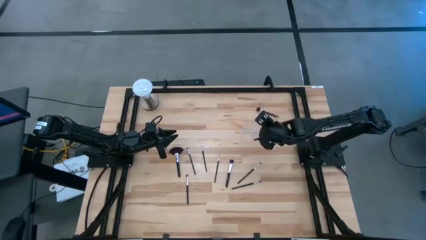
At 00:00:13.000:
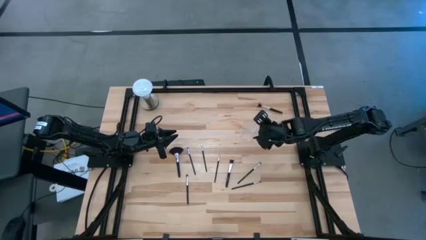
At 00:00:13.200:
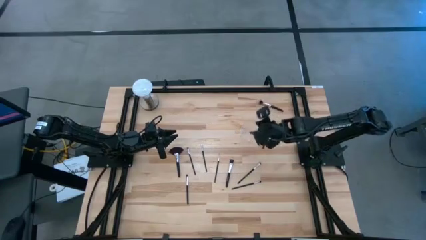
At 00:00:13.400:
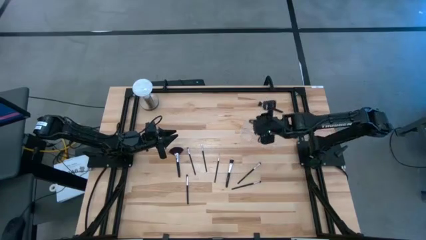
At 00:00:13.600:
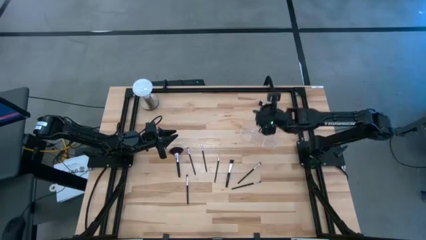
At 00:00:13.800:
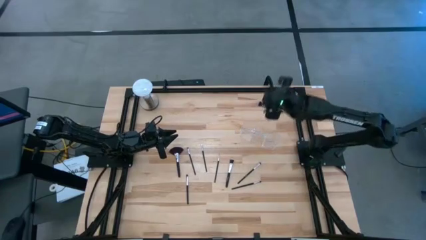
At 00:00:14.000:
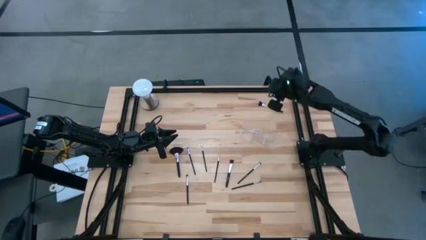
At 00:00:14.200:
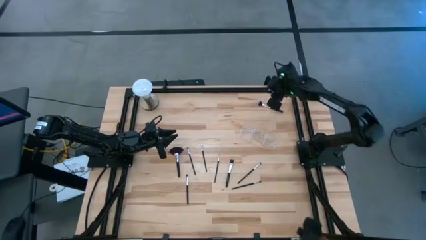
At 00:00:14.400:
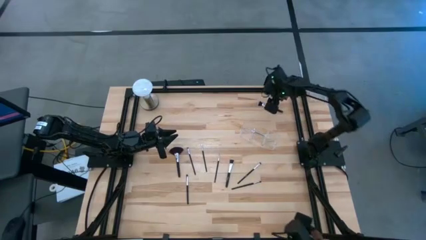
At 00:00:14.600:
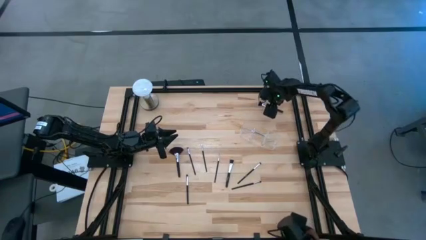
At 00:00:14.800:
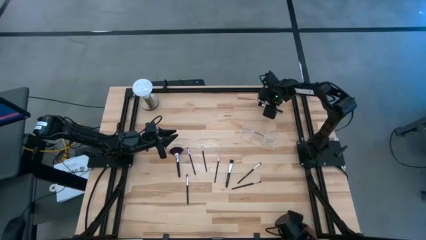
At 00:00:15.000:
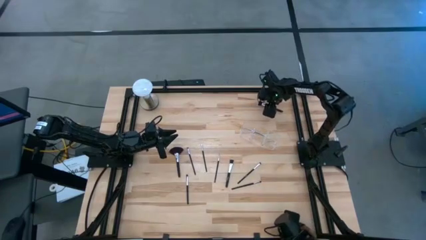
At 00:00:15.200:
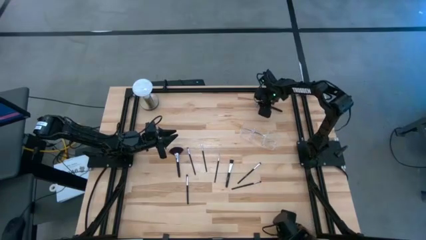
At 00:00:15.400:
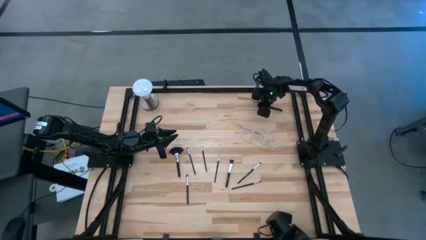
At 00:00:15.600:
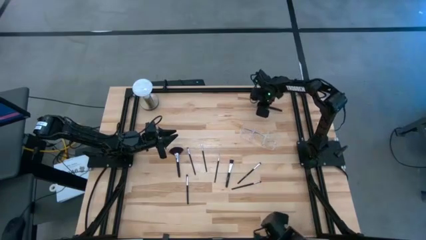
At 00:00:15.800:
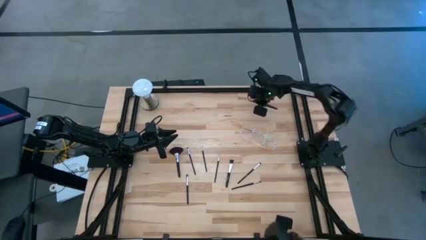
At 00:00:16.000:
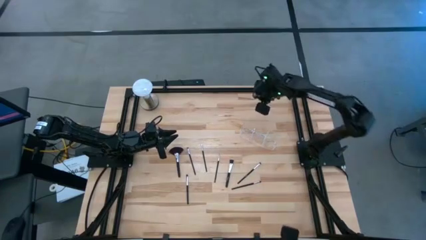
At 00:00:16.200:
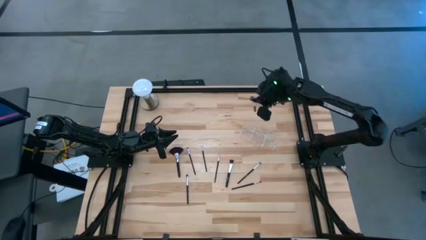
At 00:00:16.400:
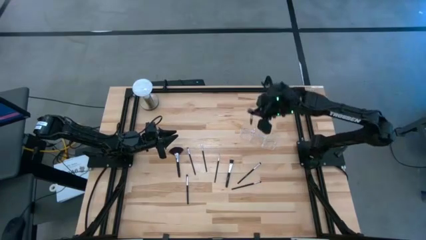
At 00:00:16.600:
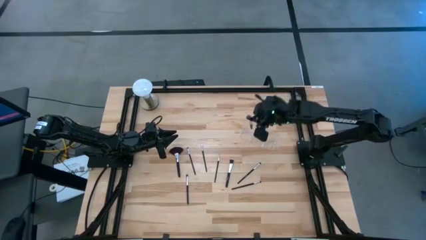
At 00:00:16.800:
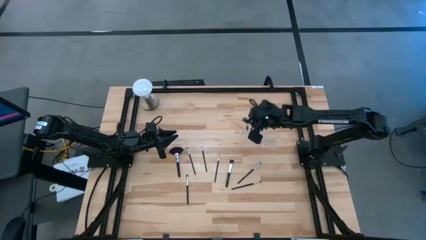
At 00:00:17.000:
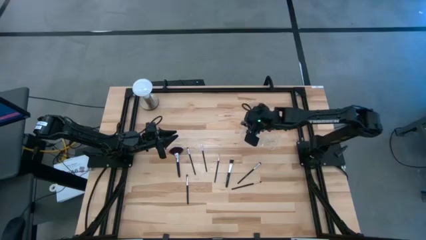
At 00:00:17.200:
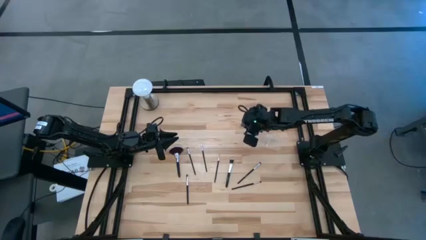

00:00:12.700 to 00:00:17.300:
Task: Pick & Place Makeup Supplies
Put the black makeup brush into the transparent organizer

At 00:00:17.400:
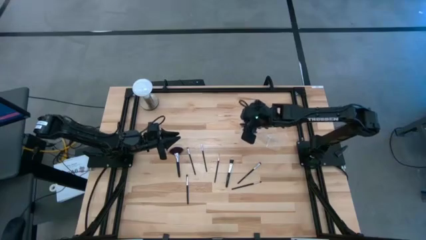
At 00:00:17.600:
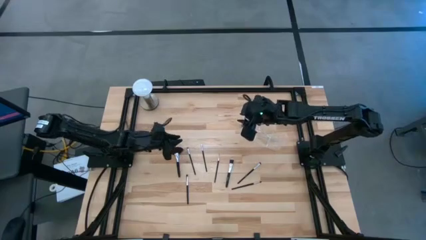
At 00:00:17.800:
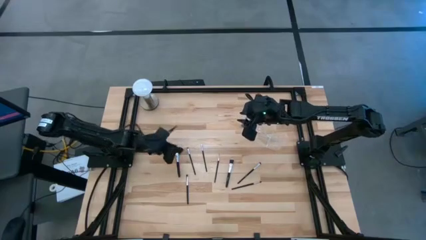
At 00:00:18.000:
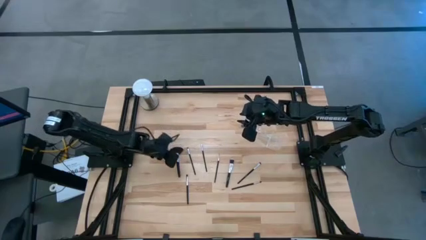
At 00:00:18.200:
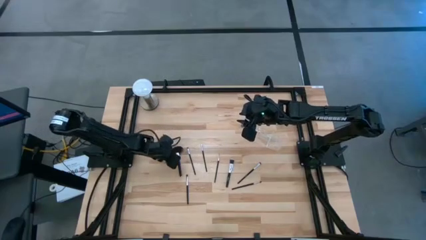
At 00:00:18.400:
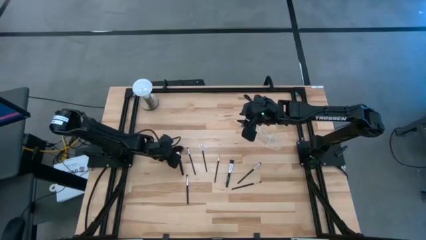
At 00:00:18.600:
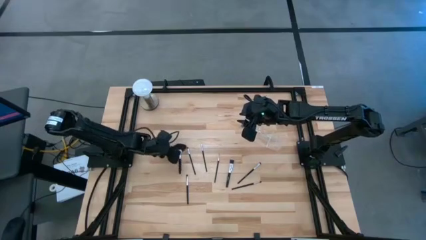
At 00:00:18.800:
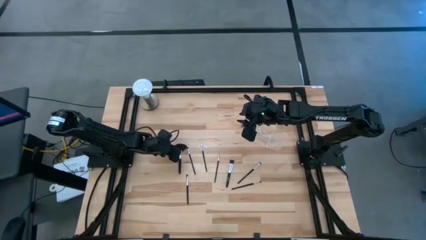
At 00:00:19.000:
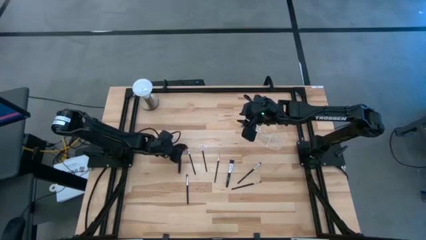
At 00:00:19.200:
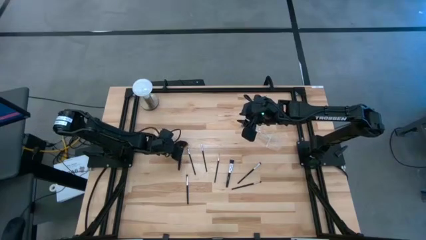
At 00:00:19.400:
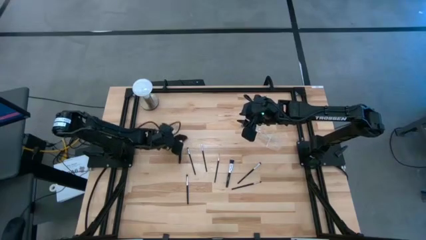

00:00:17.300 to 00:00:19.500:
Put the black makeup brush into the transparent organizer

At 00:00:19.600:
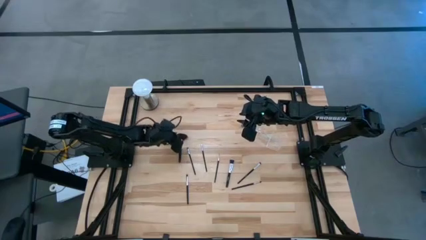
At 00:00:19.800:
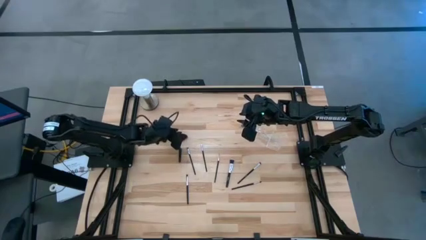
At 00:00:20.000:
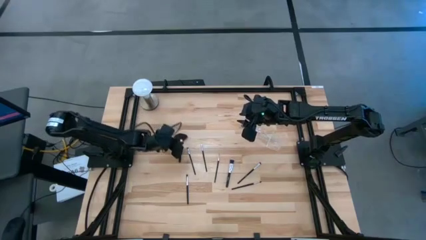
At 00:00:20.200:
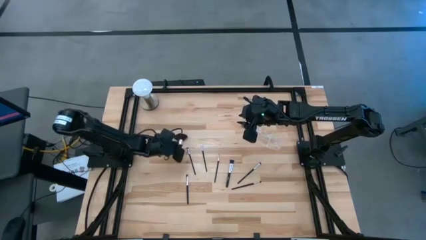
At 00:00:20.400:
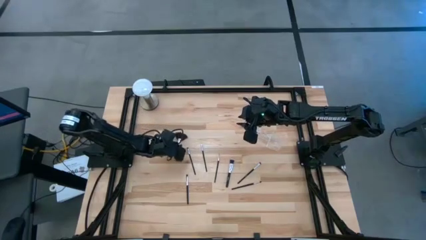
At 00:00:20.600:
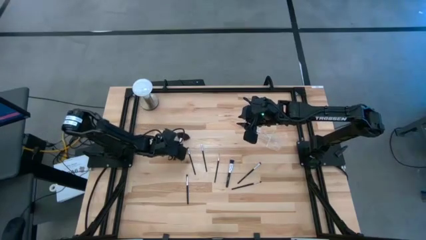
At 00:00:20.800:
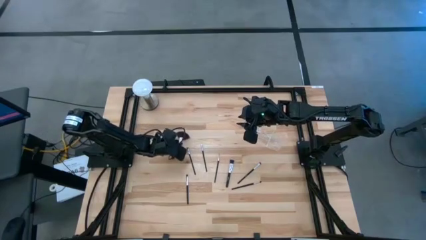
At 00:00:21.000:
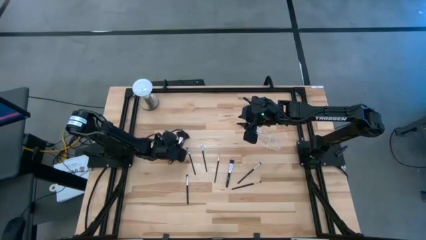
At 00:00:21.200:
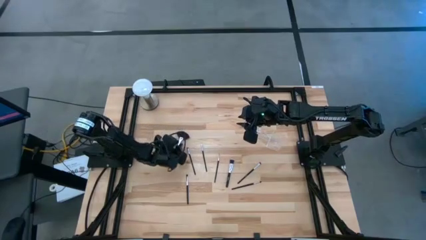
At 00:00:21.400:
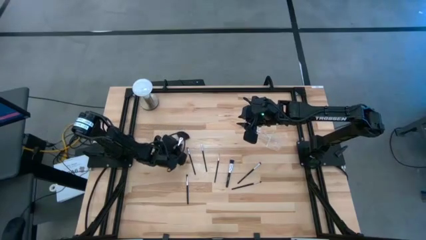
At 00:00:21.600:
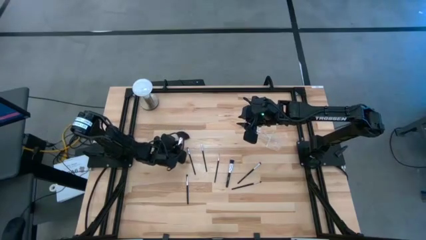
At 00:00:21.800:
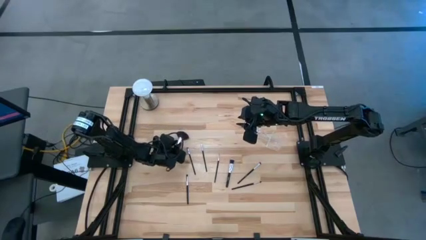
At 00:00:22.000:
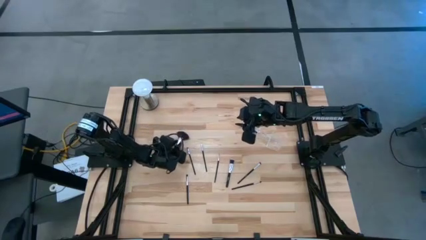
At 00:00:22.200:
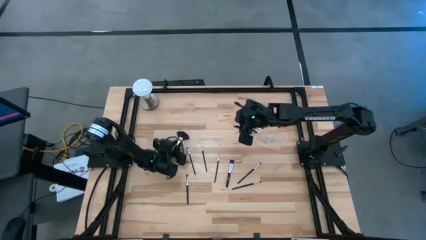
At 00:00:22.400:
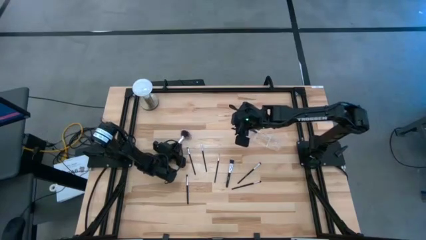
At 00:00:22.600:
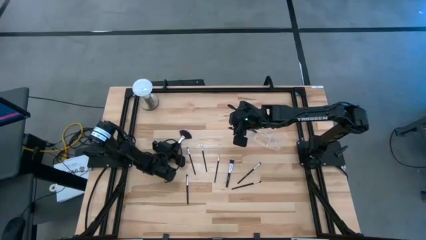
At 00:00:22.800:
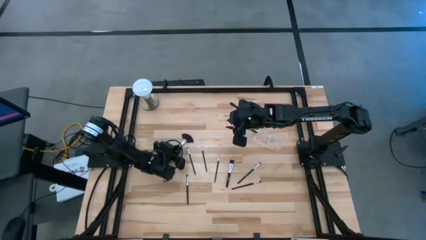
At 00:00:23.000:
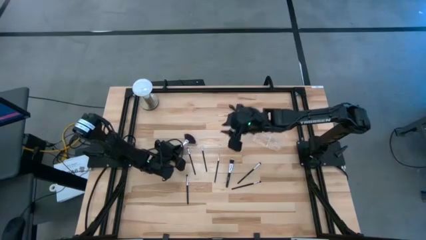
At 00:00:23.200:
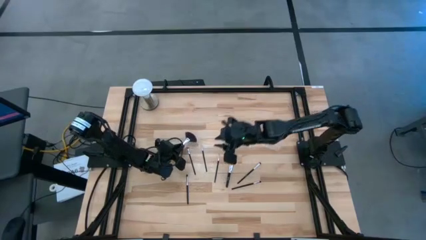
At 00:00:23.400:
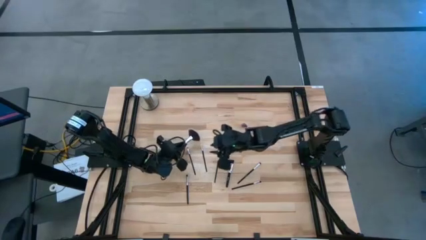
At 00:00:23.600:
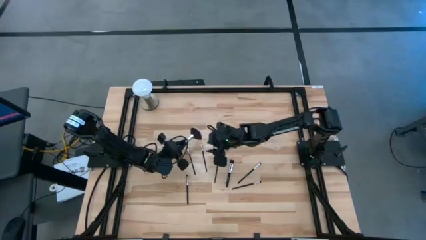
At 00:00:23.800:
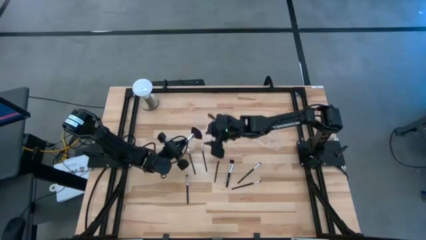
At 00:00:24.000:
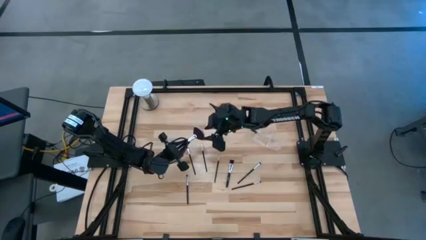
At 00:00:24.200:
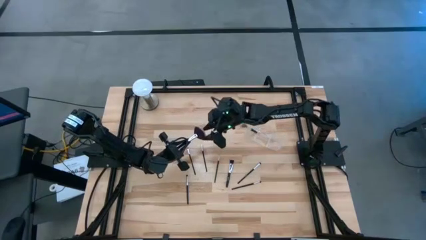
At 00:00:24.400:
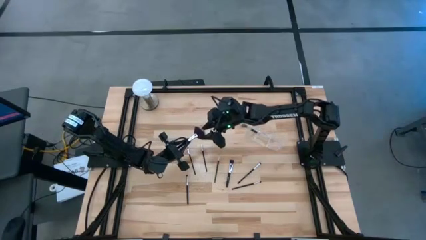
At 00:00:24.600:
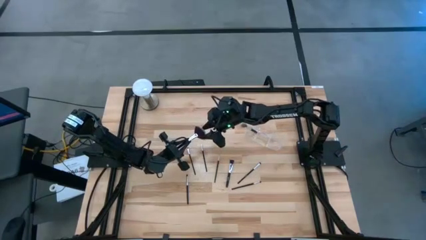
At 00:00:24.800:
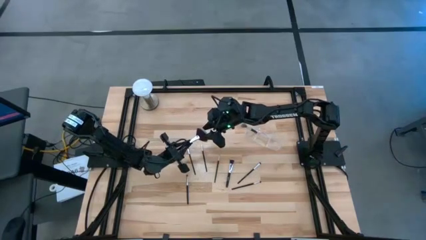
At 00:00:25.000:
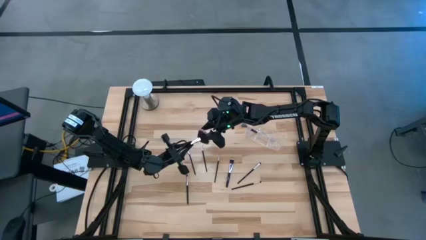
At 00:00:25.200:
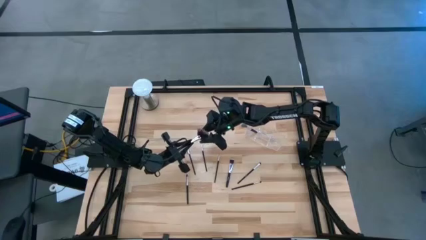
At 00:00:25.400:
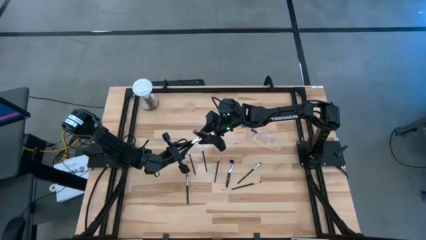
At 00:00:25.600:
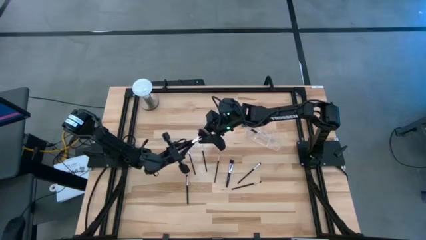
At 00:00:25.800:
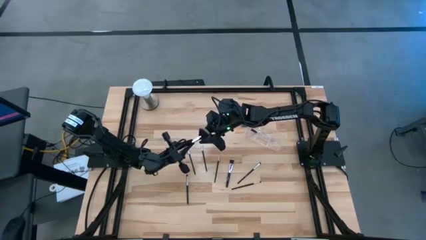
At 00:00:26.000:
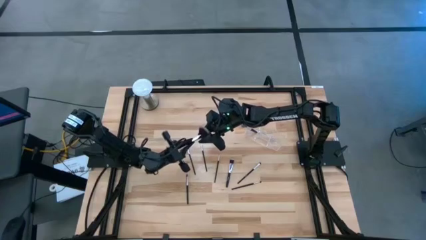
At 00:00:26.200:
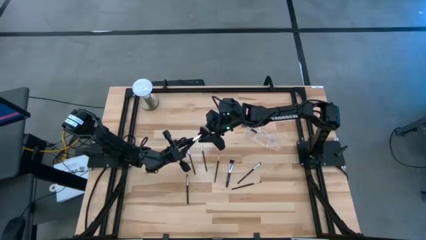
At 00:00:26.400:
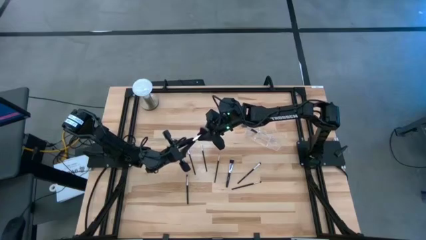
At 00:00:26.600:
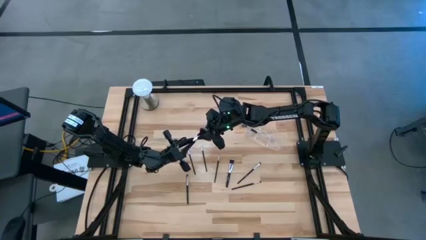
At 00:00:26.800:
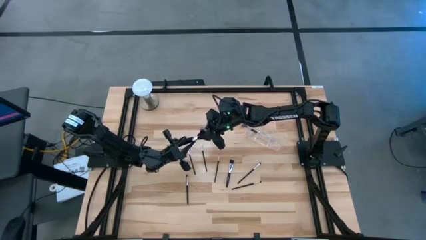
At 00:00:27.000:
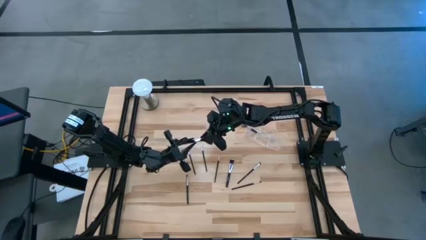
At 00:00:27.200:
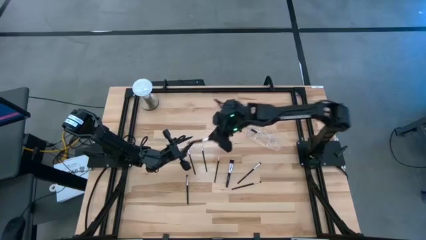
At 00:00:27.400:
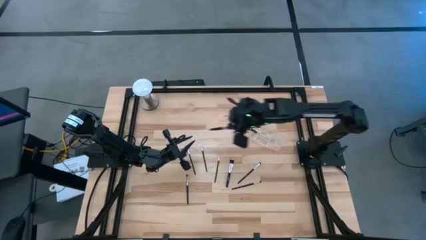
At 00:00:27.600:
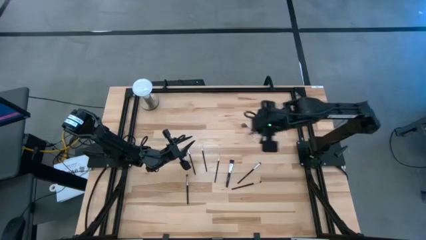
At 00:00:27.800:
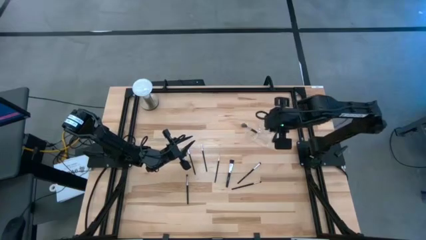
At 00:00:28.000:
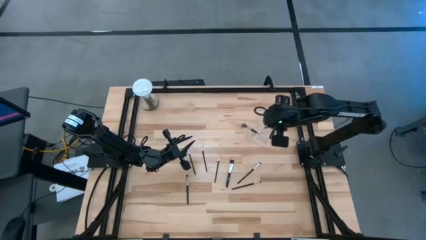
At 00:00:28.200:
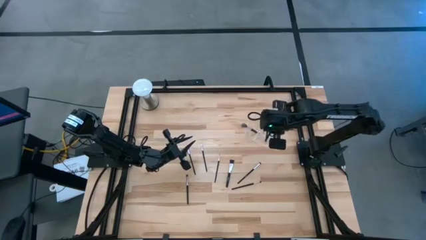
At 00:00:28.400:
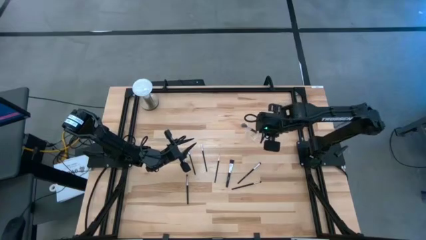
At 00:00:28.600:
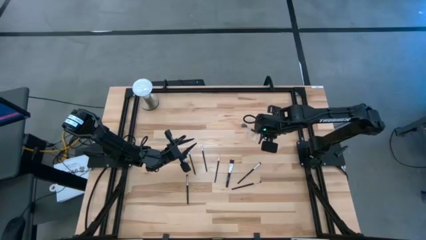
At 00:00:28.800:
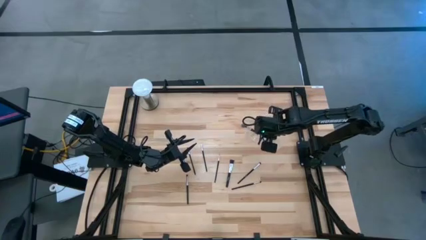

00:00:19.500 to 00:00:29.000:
Put the black makeup brush into the transparent organizer
